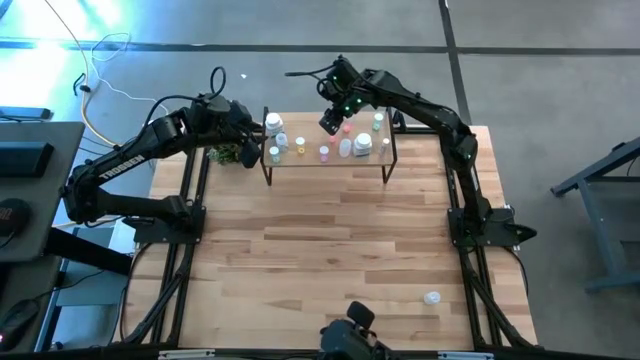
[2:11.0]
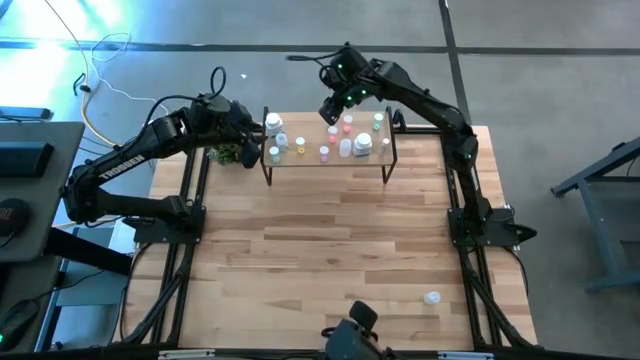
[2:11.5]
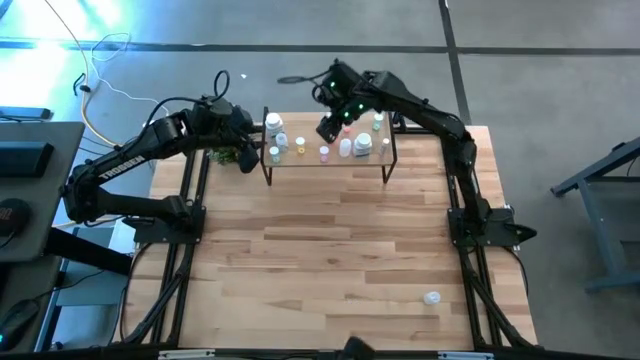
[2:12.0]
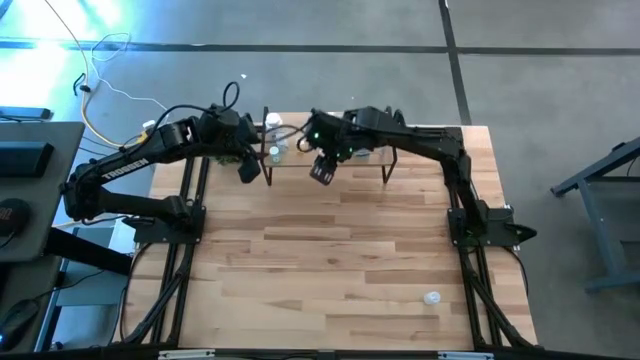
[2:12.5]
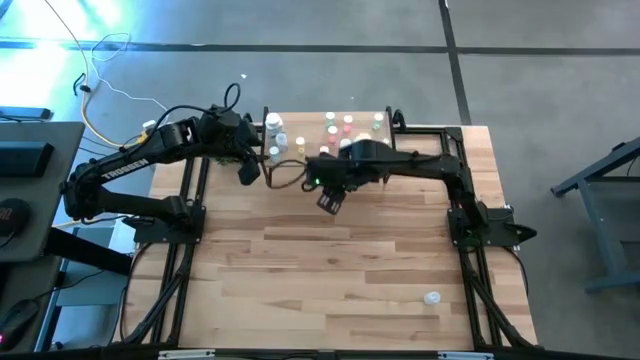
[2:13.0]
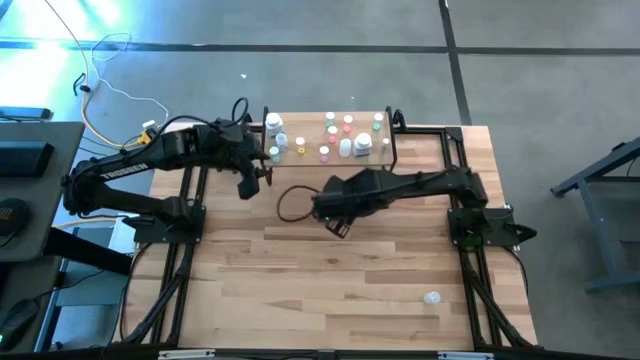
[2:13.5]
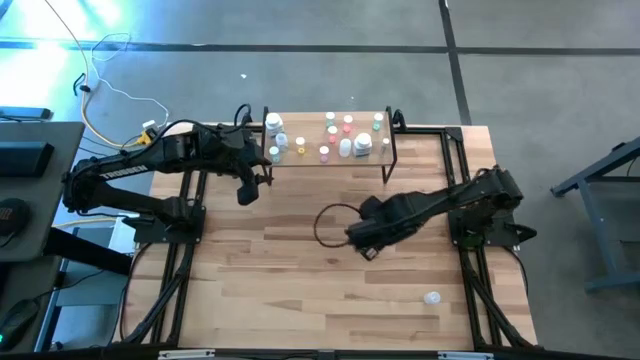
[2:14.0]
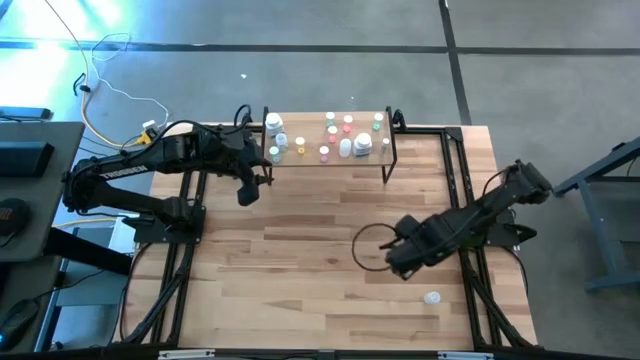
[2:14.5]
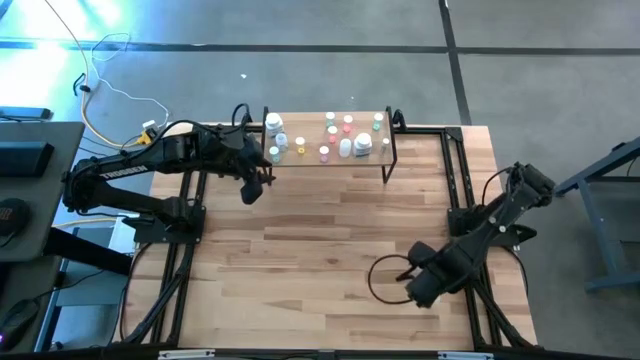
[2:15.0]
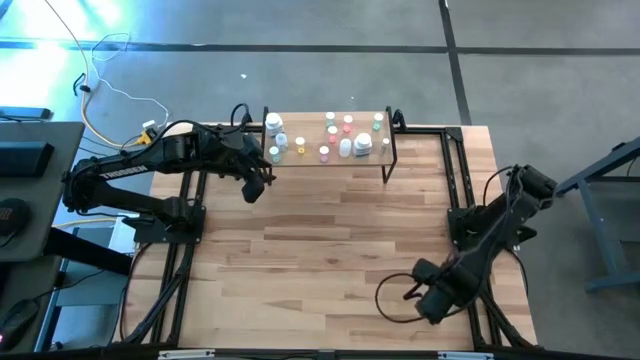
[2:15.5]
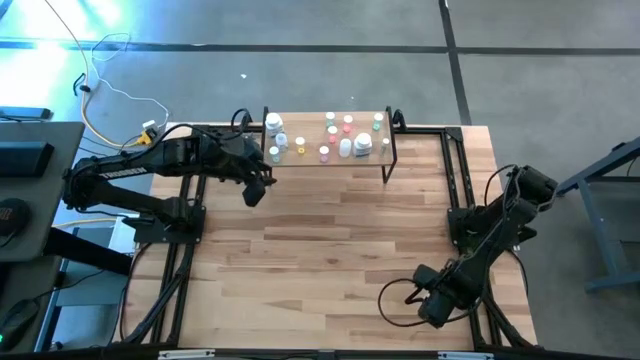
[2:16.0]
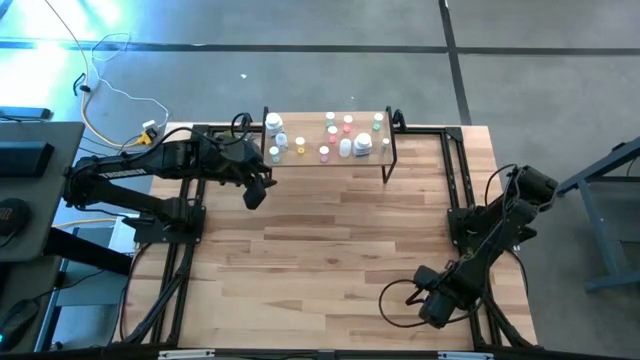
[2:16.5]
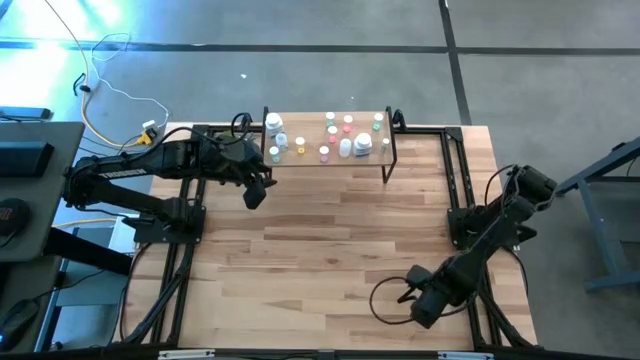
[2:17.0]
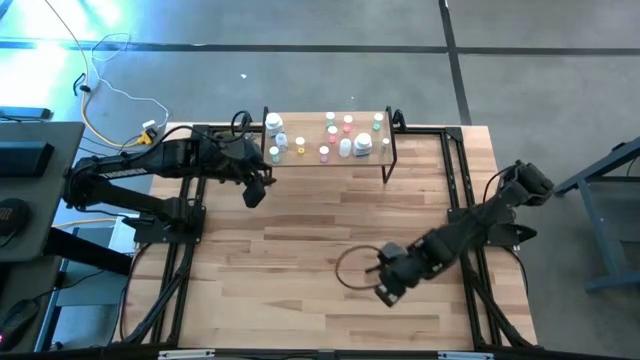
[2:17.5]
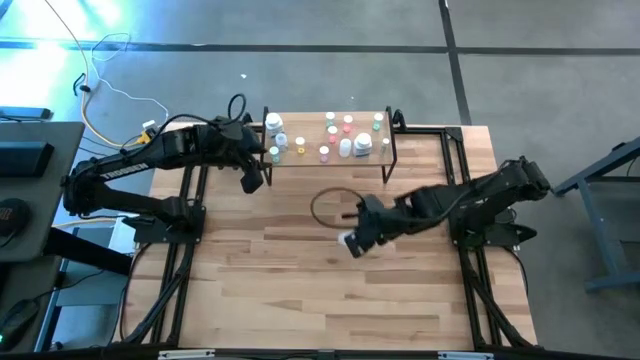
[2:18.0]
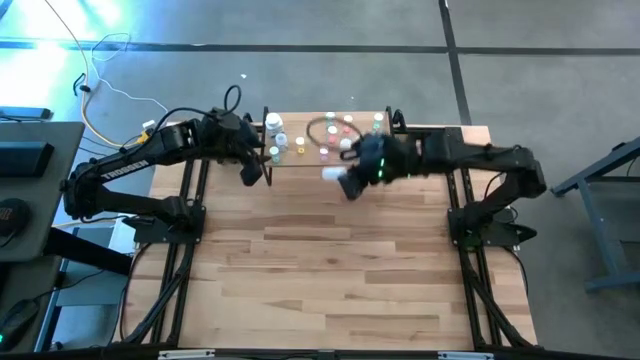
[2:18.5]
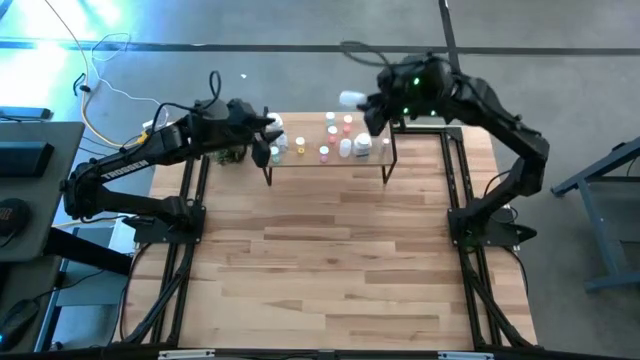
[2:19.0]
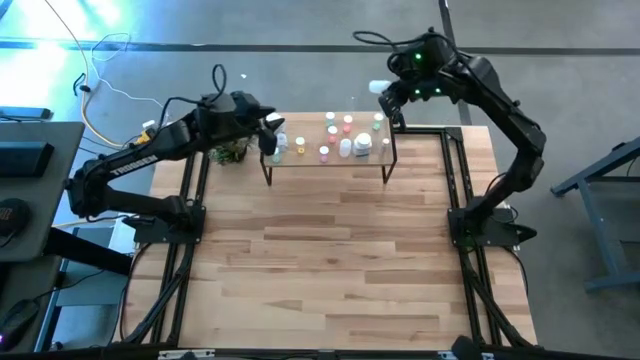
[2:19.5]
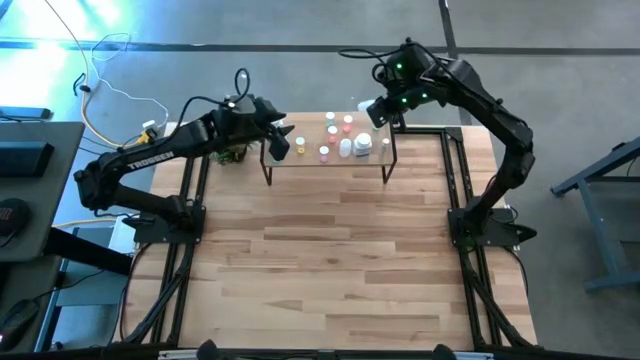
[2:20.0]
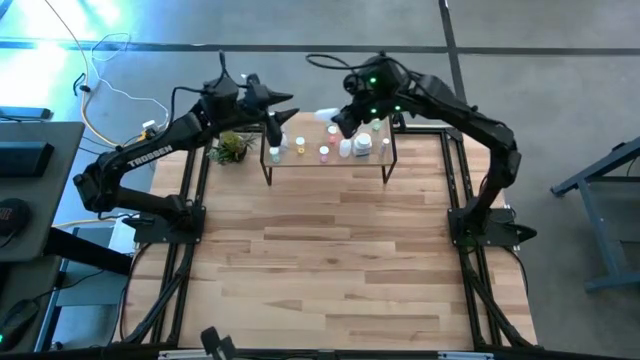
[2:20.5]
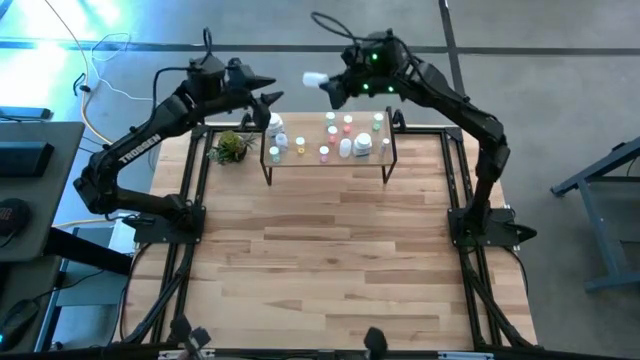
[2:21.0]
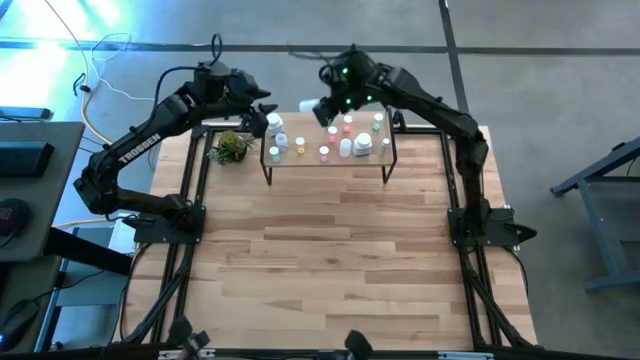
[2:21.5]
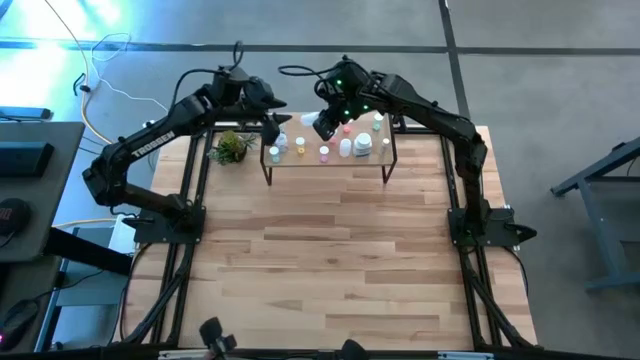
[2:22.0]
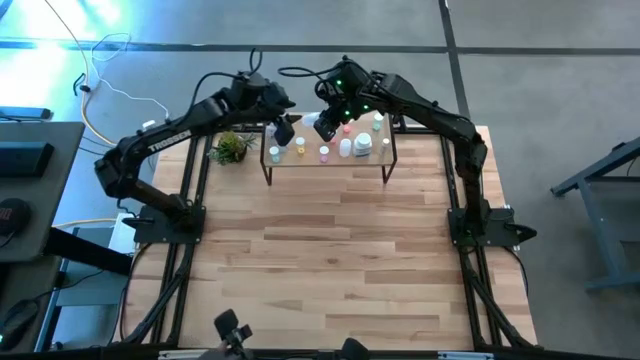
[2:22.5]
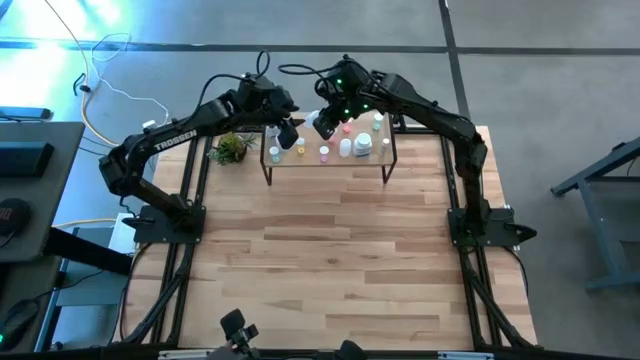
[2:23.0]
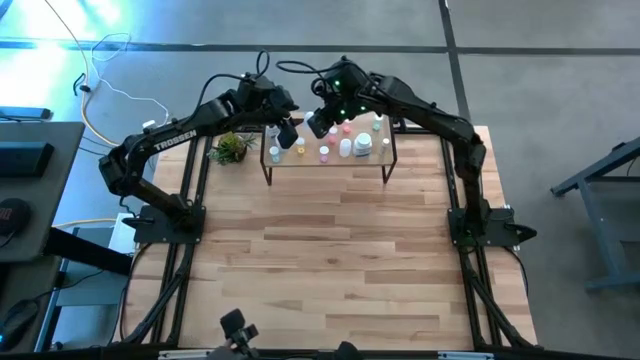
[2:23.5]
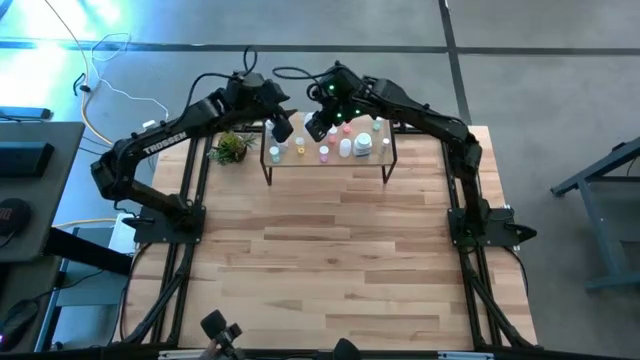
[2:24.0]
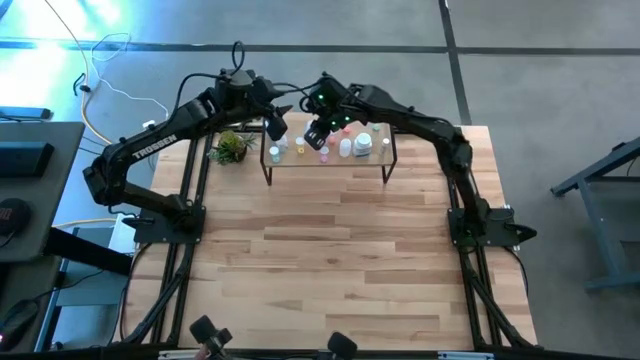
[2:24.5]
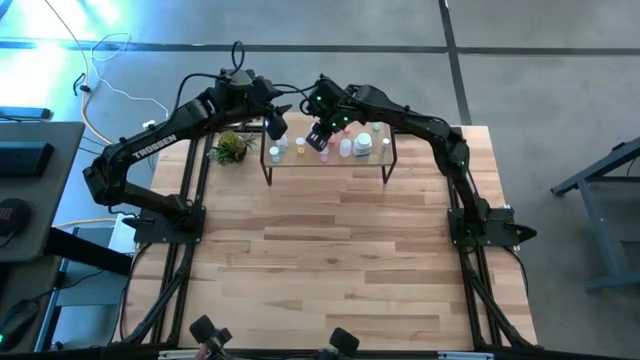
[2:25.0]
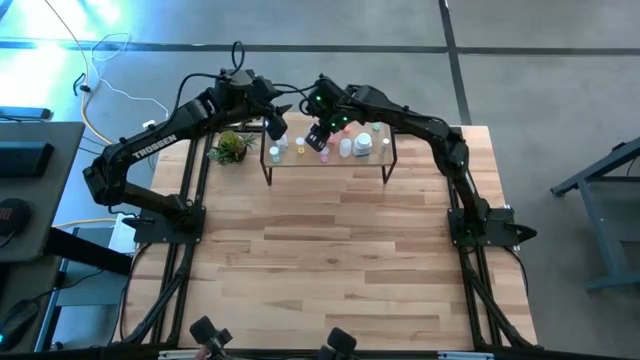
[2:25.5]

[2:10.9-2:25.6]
Task: Pick and place medicine bottles onto shelf by color
Put the small white pill bottle on the shelf

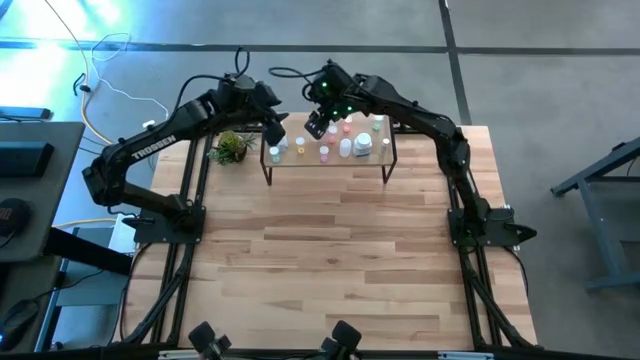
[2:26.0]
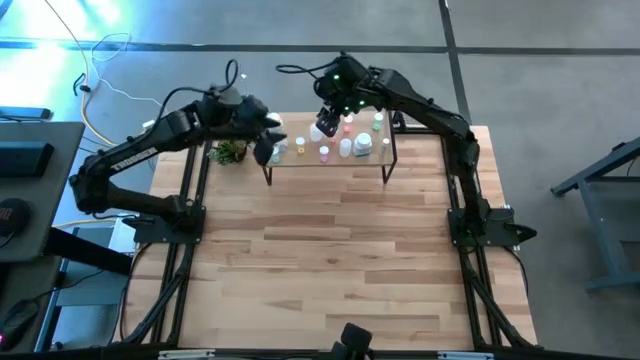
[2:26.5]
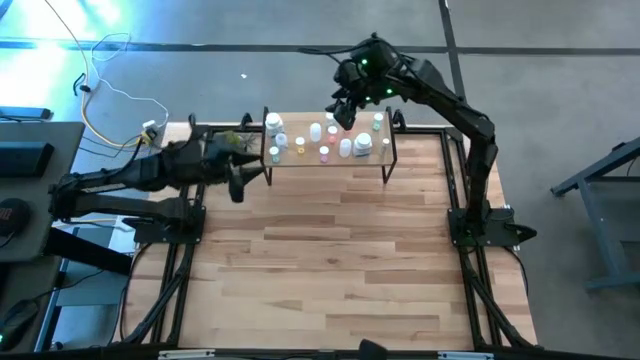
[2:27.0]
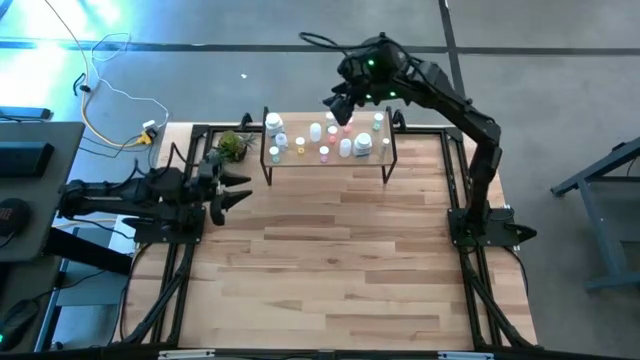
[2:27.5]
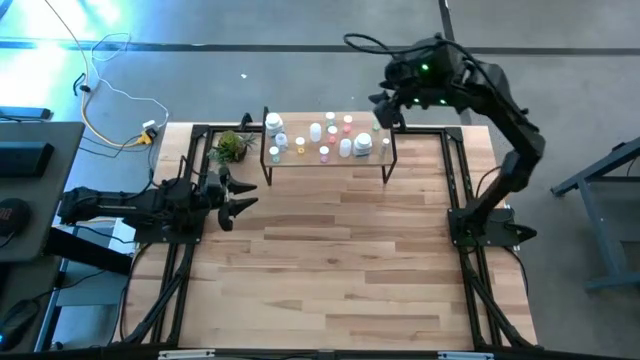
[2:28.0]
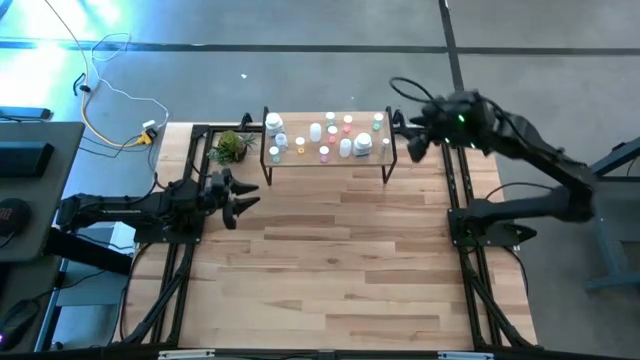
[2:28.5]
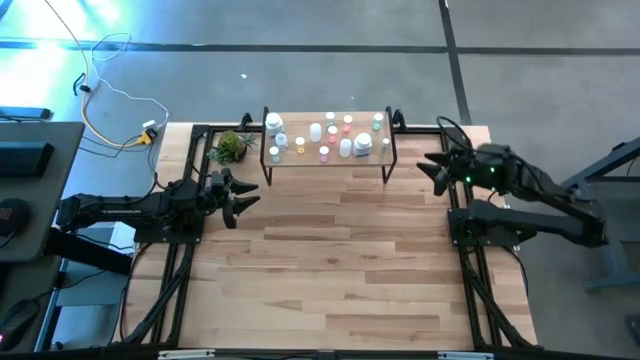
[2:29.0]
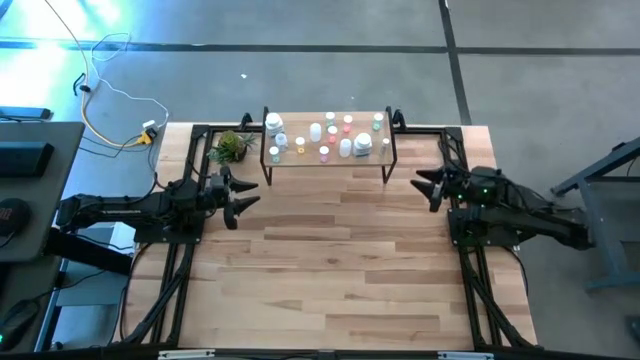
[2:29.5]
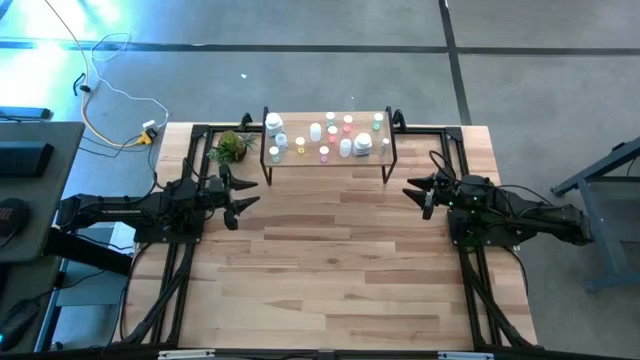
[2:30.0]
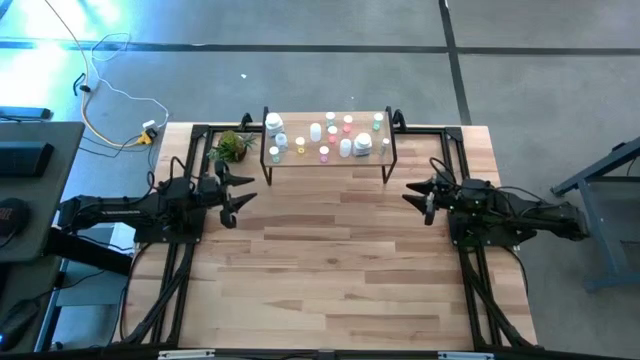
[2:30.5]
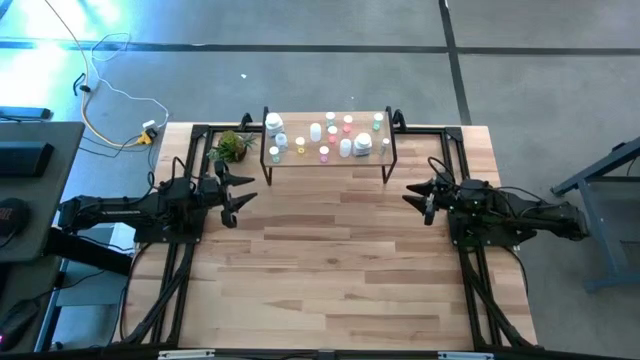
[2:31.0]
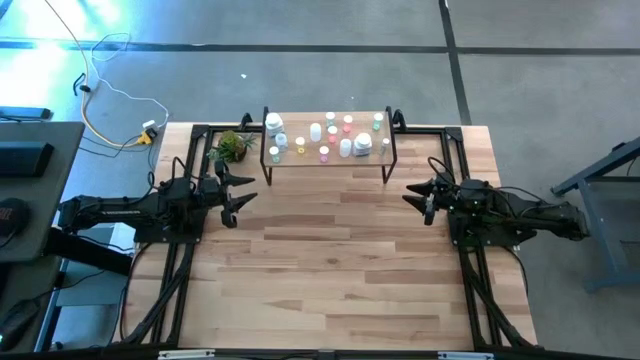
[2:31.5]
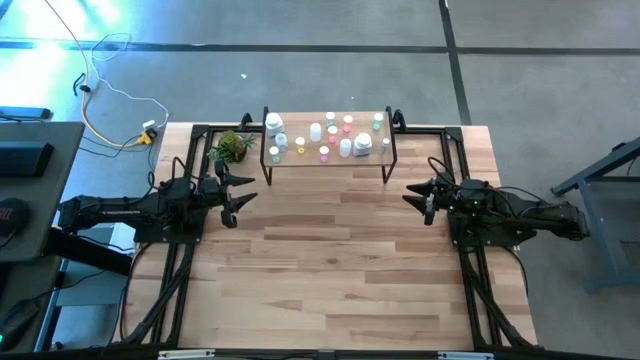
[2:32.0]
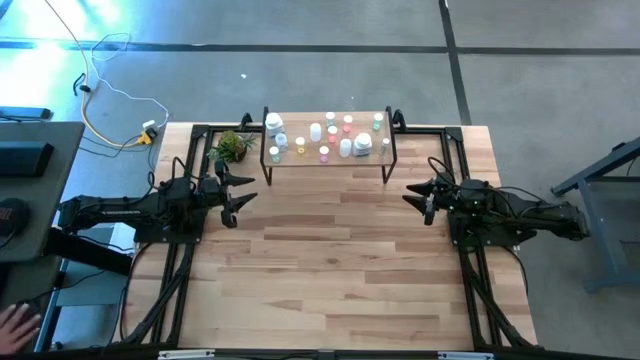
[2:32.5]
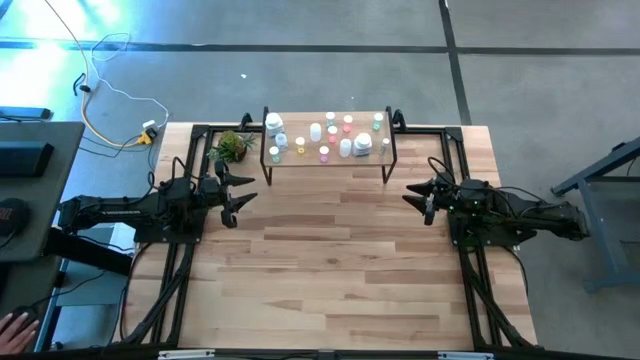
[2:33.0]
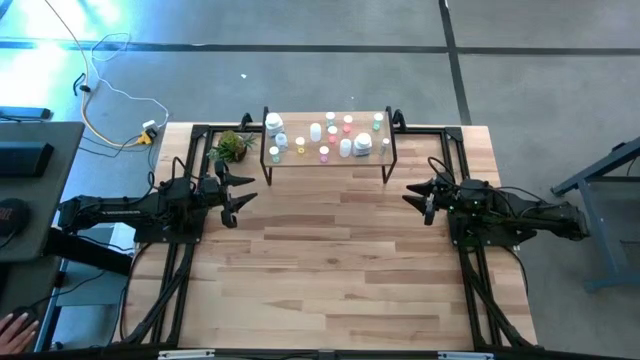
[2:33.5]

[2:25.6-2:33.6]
Return to Home Position
